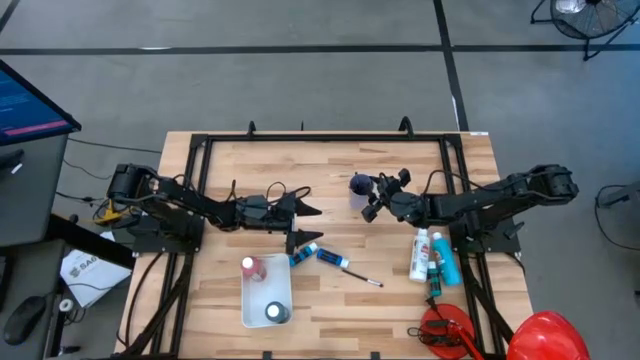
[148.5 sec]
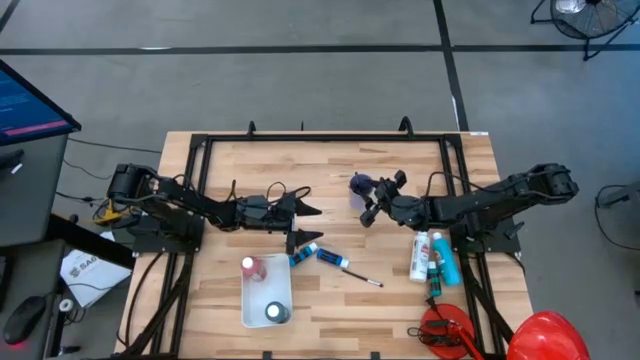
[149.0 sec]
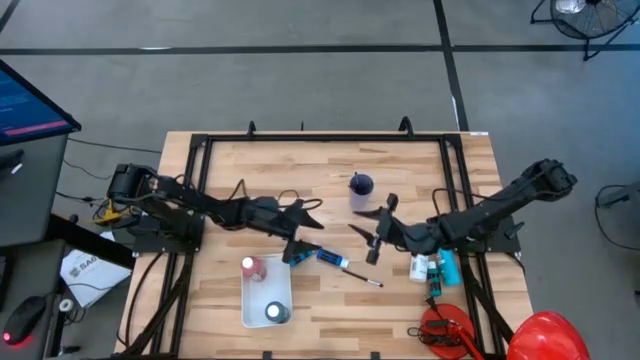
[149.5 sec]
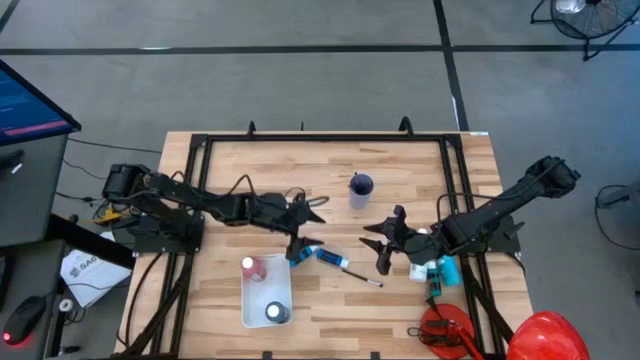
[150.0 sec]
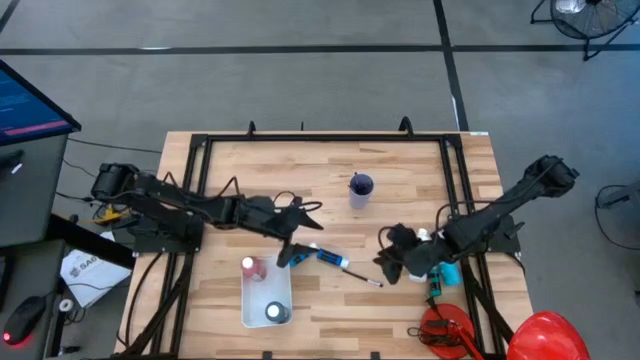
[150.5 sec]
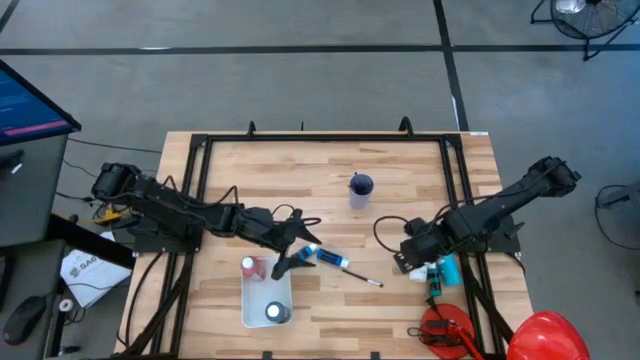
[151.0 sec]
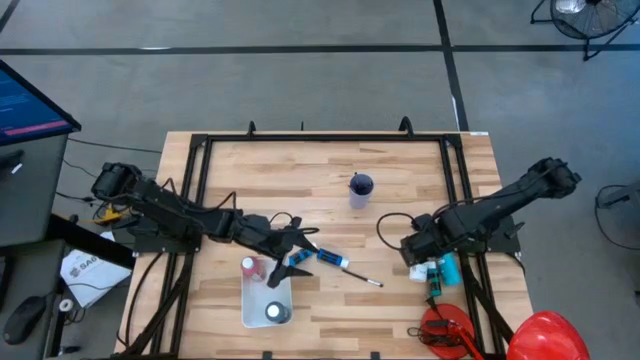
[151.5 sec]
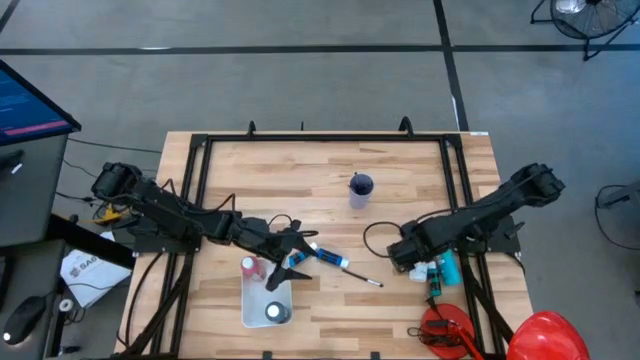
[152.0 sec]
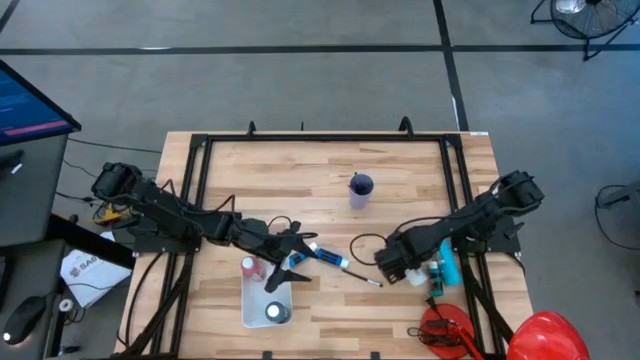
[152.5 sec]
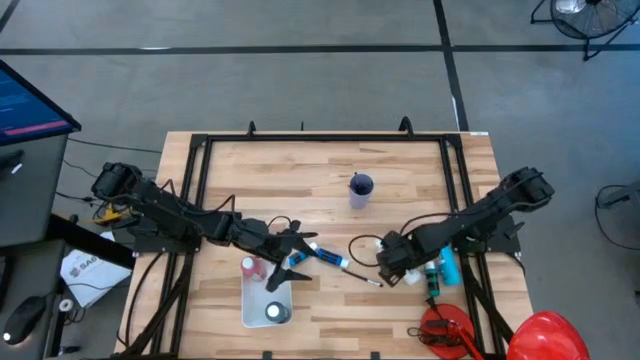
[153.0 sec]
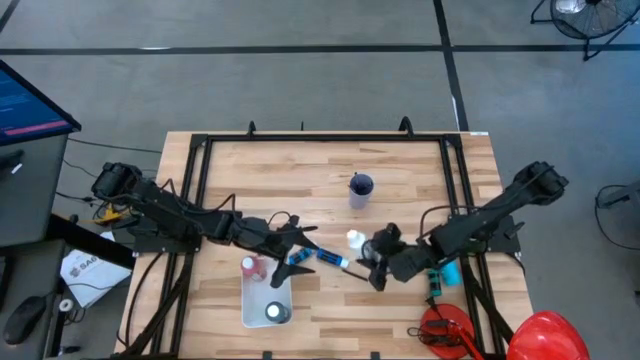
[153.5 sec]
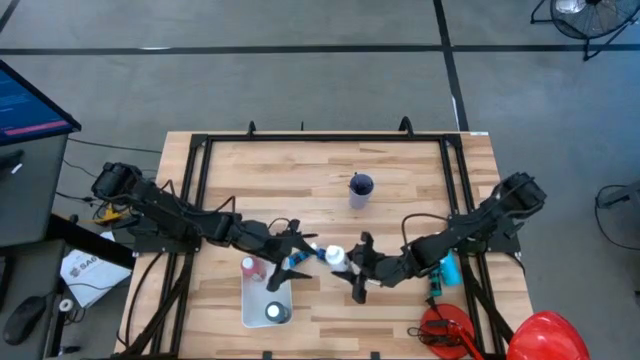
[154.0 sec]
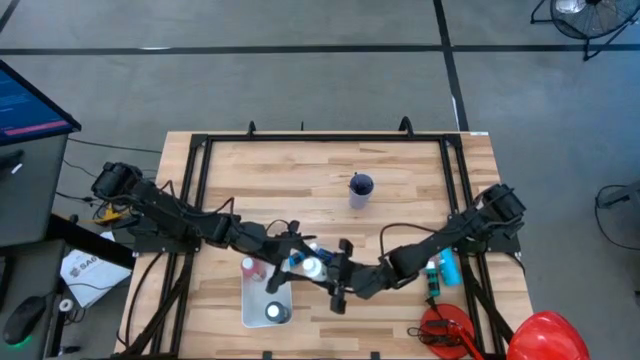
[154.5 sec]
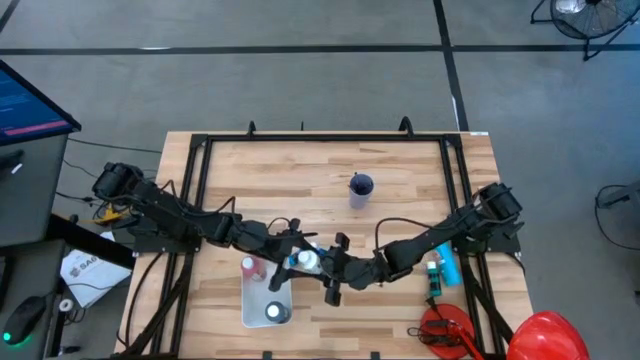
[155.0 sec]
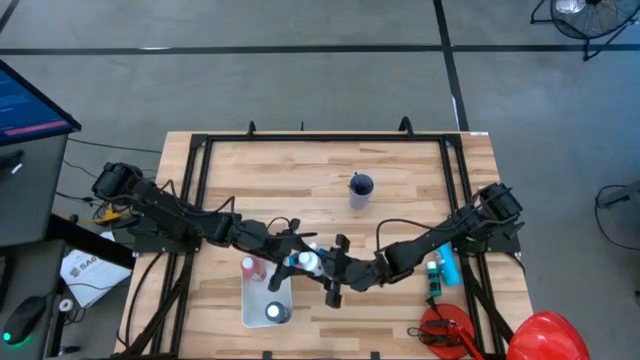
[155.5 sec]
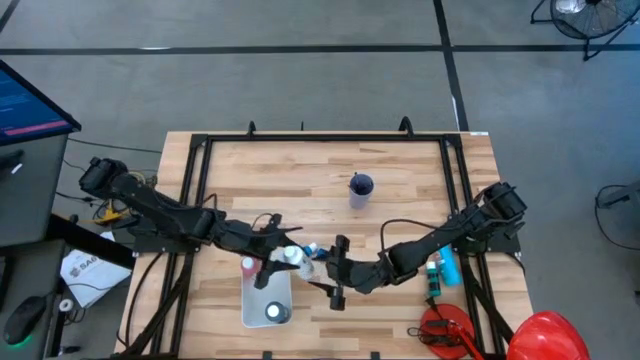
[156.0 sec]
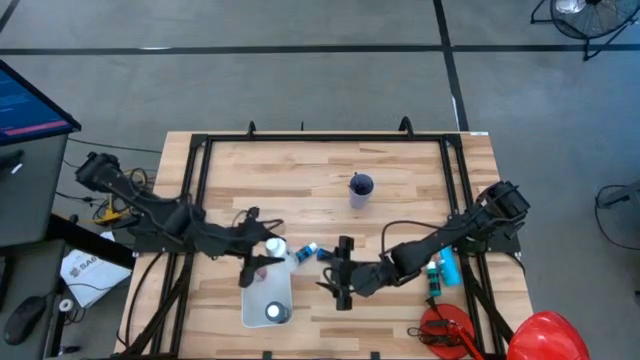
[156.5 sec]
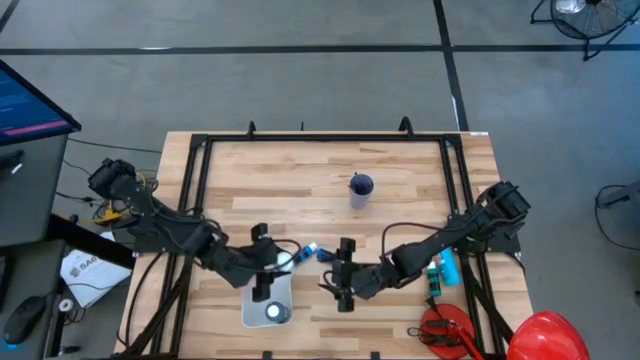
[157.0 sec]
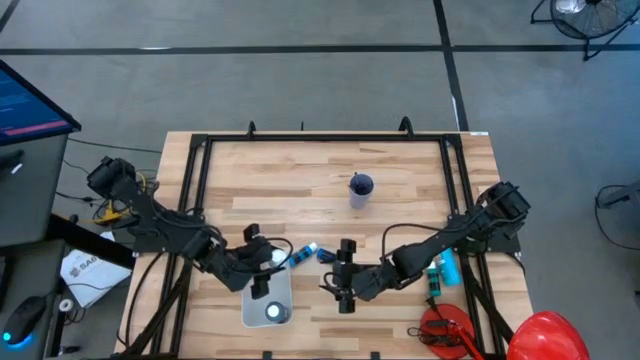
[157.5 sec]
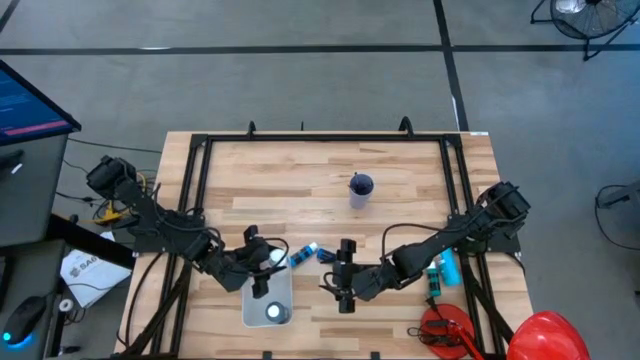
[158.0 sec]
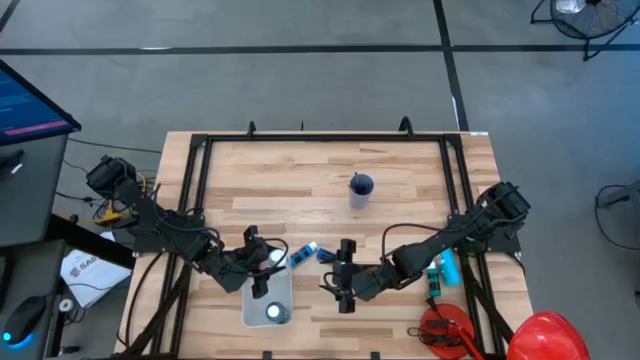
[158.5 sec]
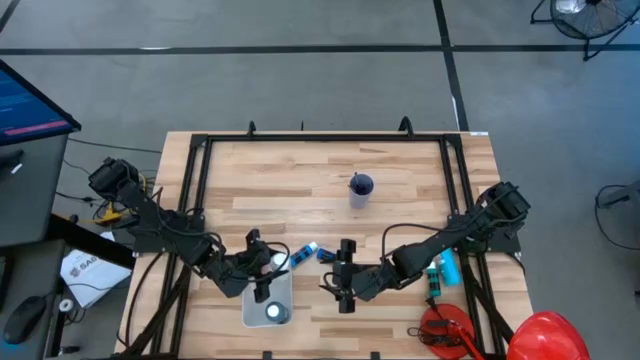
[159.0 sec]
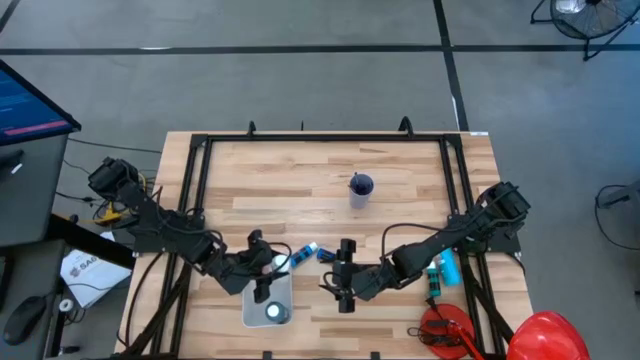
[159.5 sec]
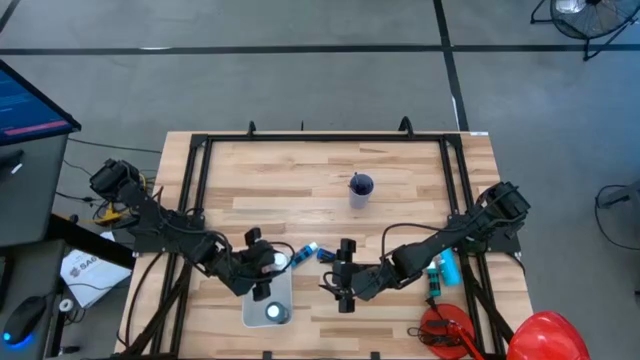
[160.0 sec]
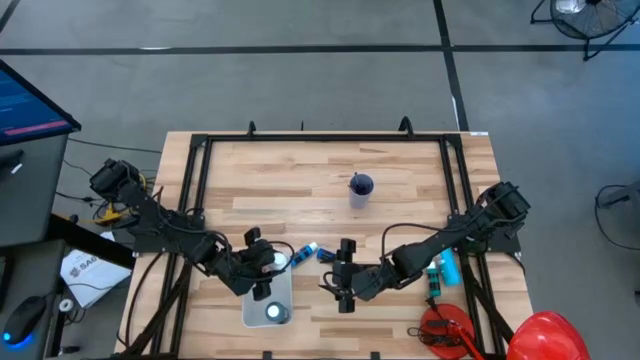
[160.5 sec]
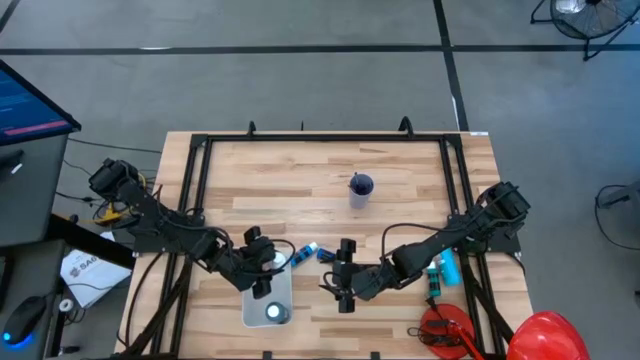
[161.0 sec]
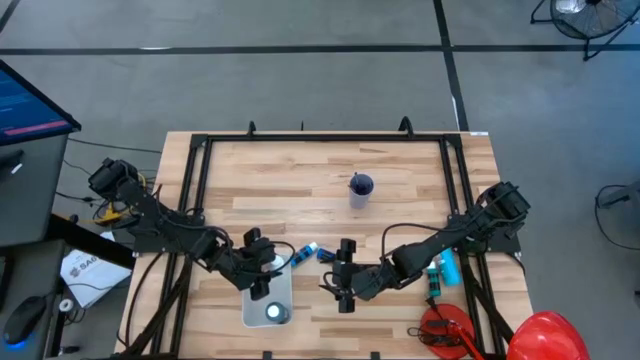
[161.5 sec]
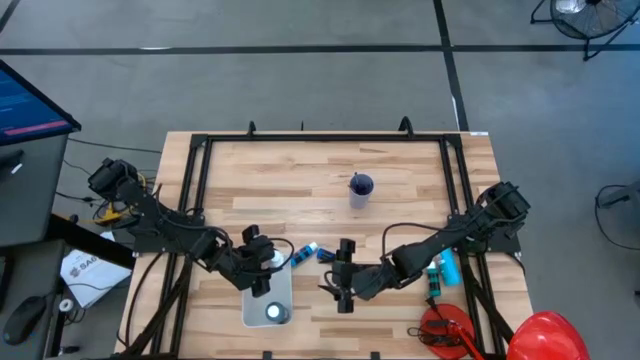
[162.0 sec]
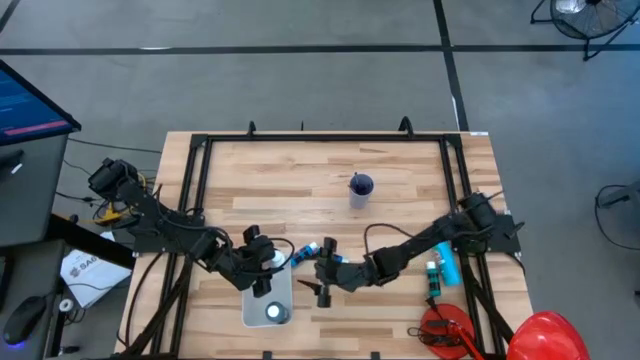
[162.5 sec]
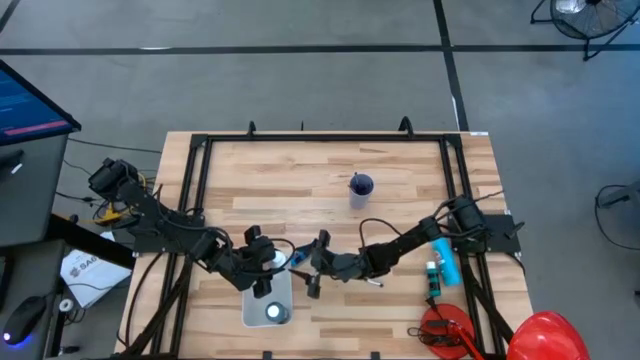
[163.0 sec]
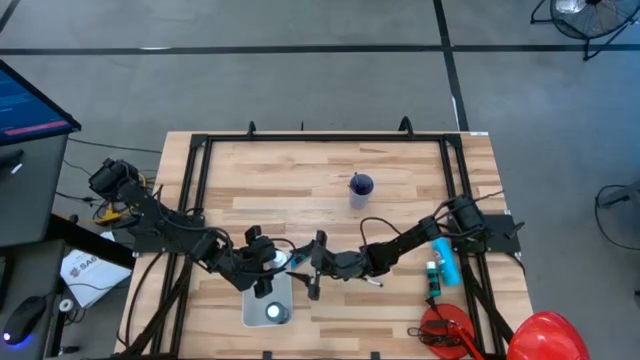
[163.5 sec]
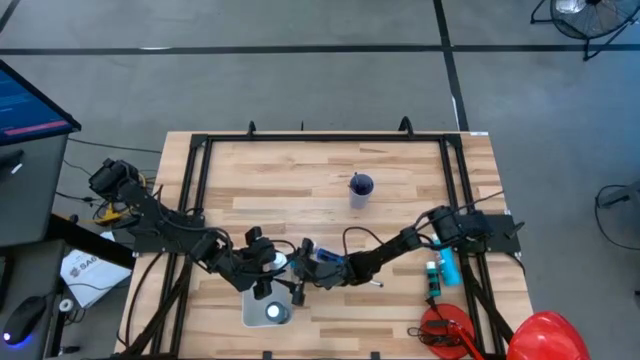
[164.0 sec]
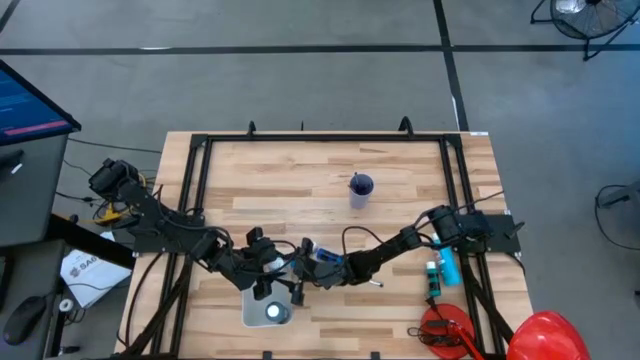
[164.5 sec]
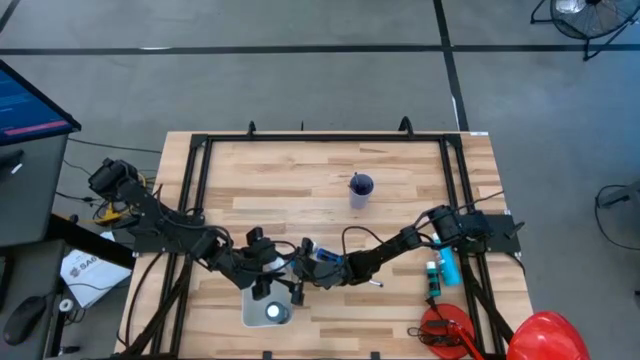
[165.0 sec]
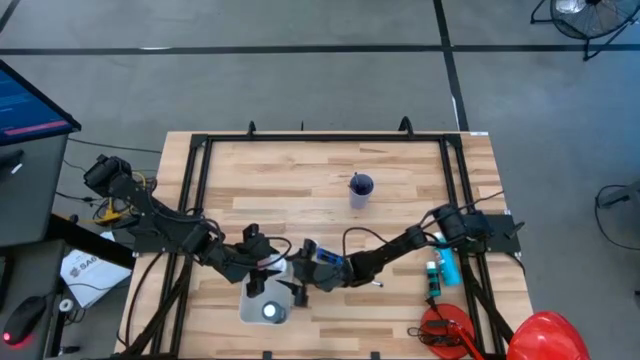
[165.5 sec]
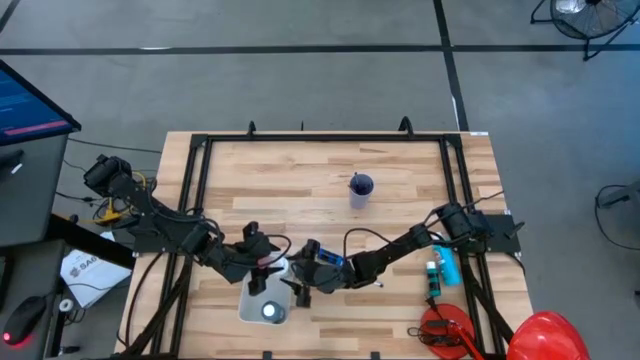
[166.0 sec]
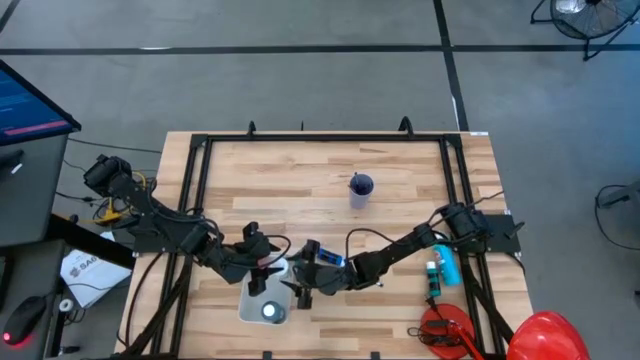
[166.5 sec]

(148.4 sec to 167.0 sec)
Task: Pick & Place Paint Supplies
Put the white paint bottle into the white bin

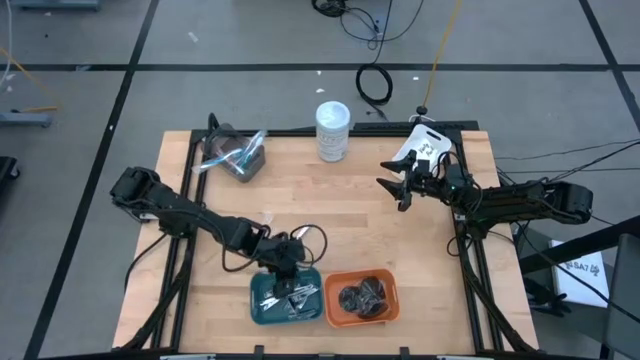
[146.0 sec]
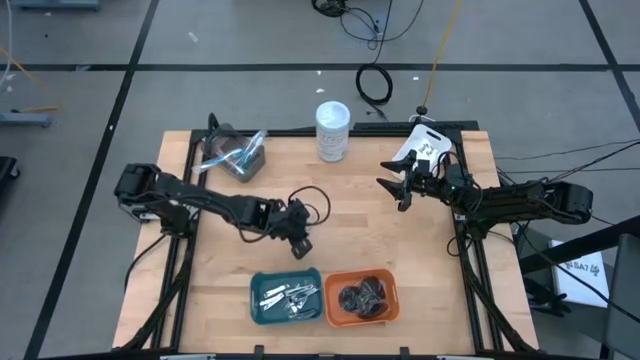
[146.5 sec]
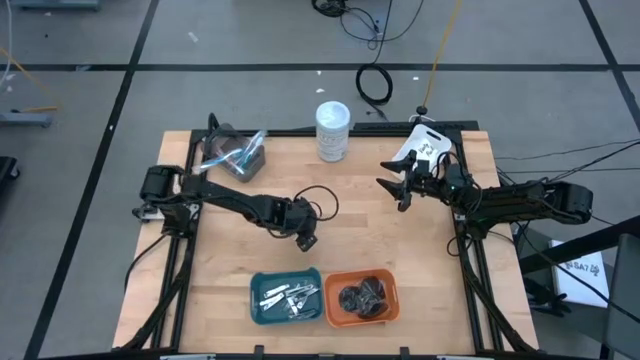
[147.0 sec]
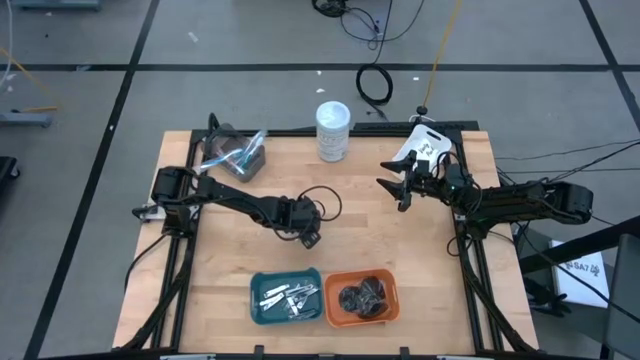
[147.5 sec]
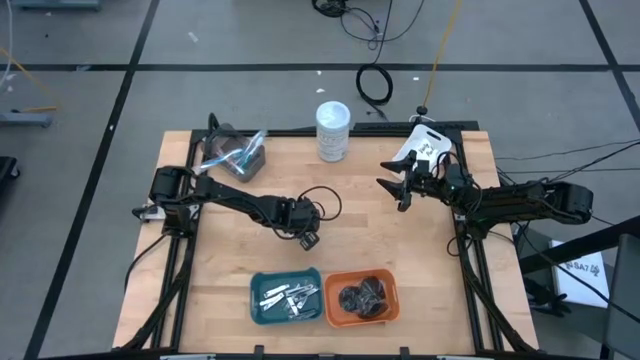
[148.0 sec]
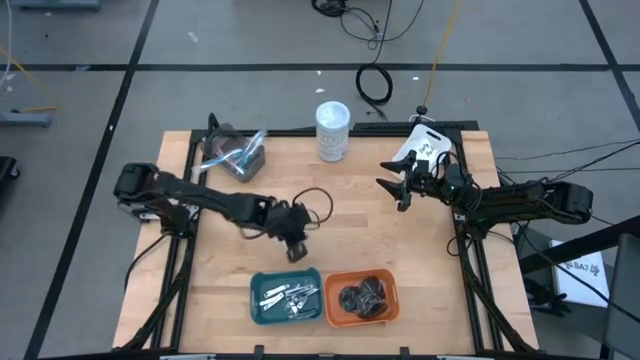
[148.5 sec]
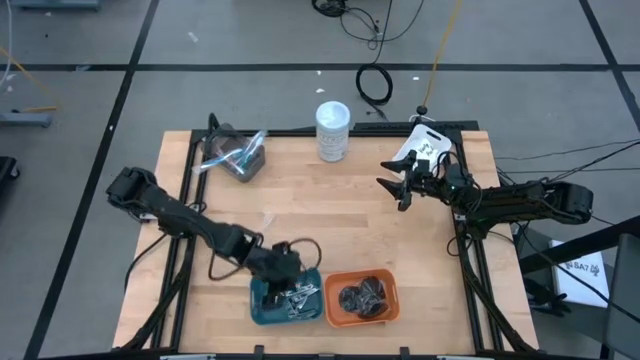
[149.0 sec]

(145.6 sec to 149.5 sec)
Task: Pick & Place Travel size toiletries
Put the silver nail cutter into the green bin
